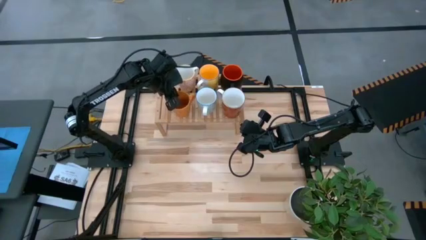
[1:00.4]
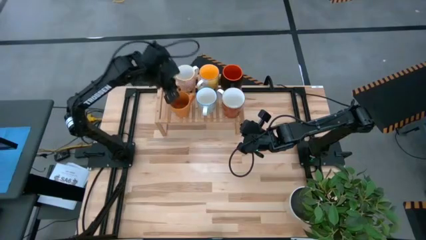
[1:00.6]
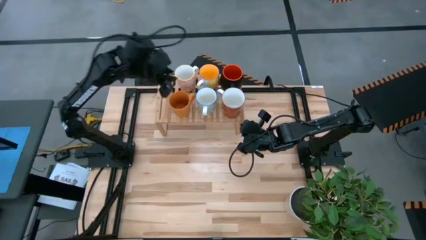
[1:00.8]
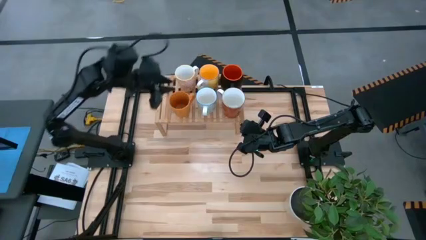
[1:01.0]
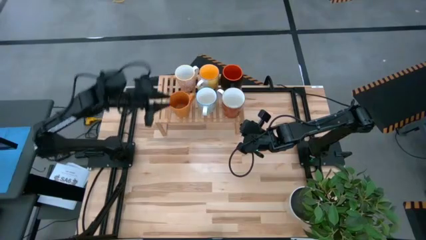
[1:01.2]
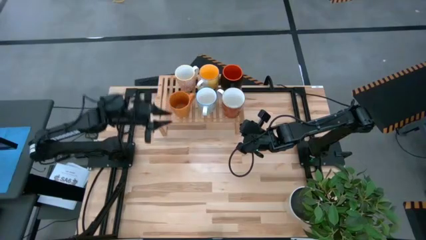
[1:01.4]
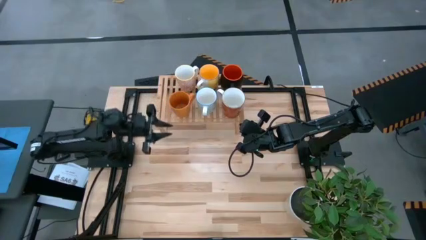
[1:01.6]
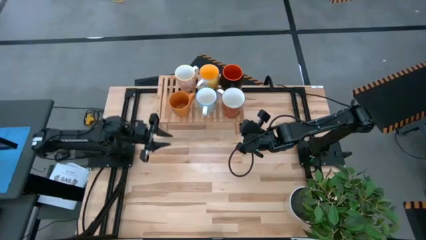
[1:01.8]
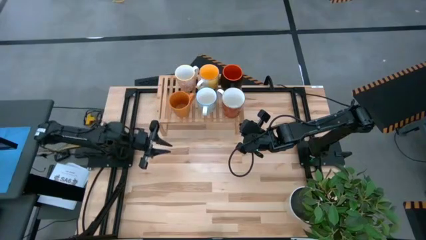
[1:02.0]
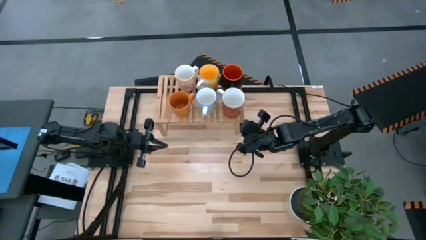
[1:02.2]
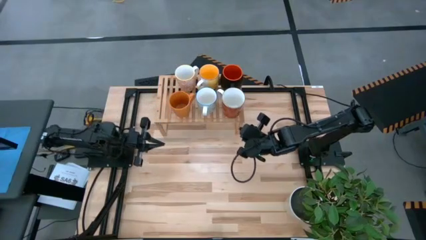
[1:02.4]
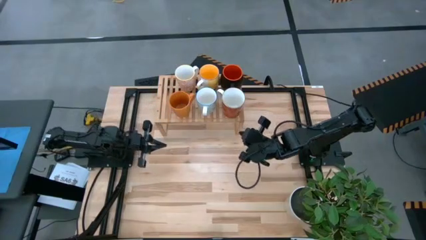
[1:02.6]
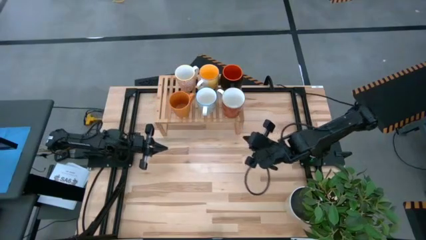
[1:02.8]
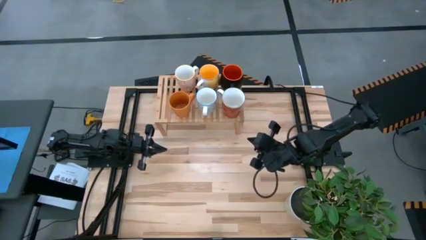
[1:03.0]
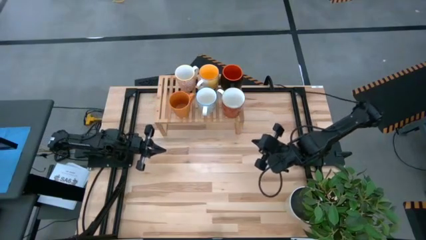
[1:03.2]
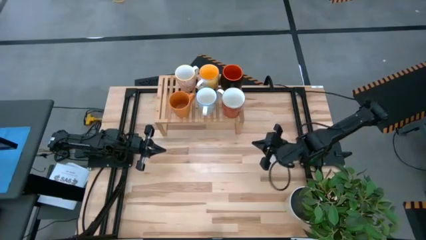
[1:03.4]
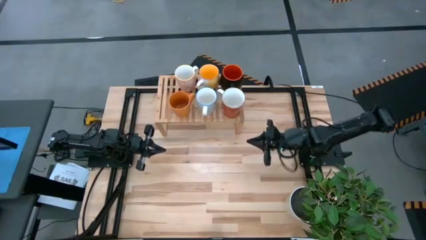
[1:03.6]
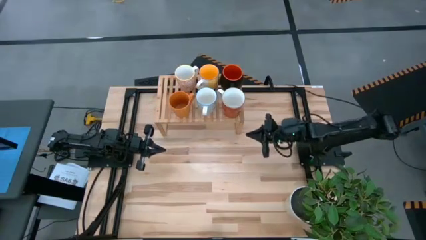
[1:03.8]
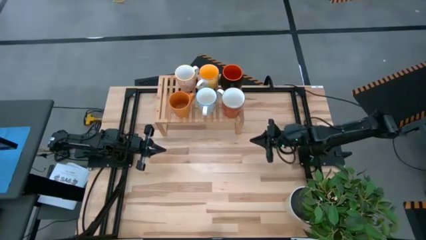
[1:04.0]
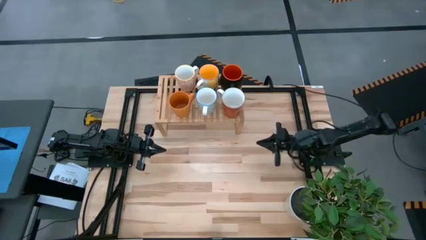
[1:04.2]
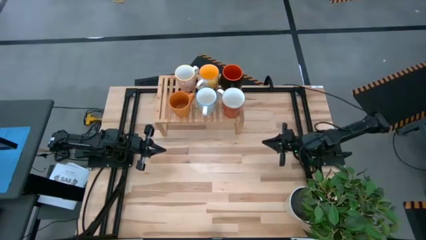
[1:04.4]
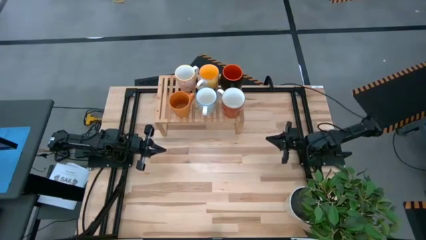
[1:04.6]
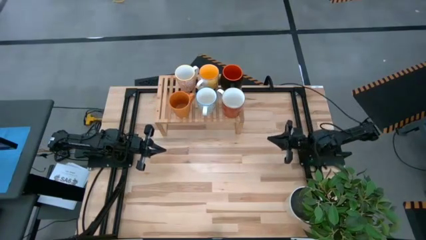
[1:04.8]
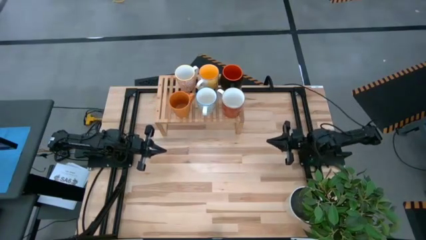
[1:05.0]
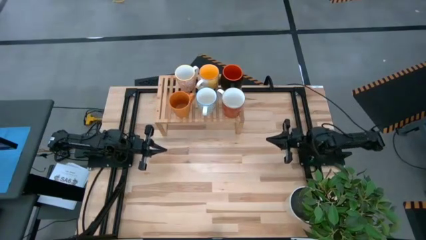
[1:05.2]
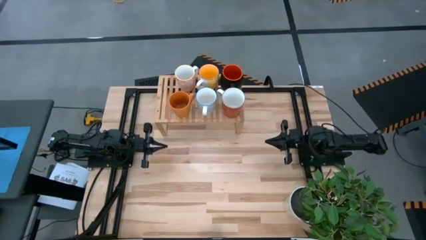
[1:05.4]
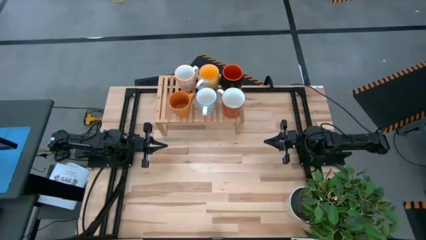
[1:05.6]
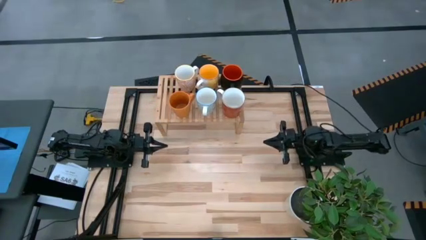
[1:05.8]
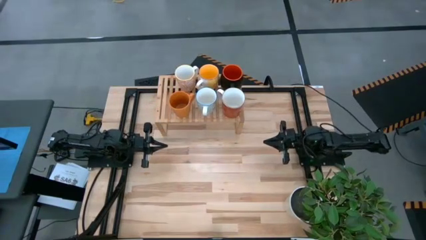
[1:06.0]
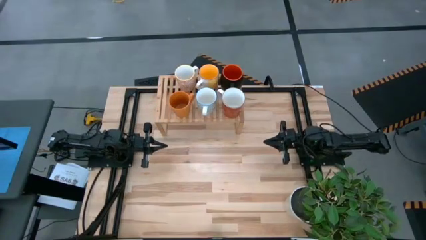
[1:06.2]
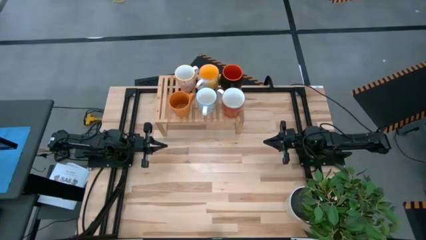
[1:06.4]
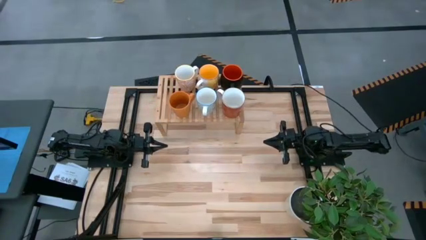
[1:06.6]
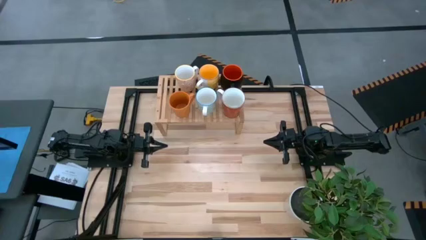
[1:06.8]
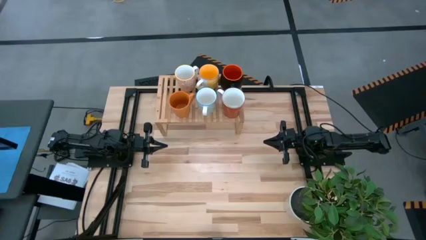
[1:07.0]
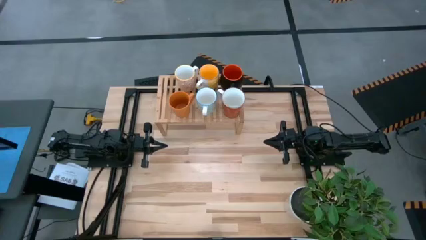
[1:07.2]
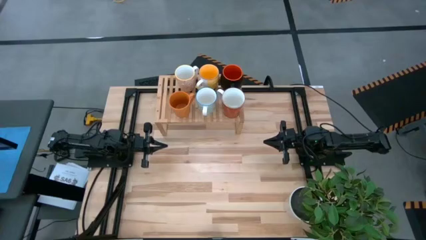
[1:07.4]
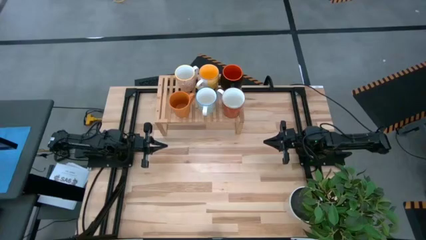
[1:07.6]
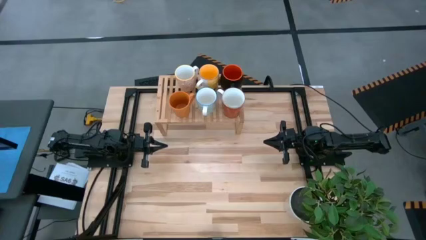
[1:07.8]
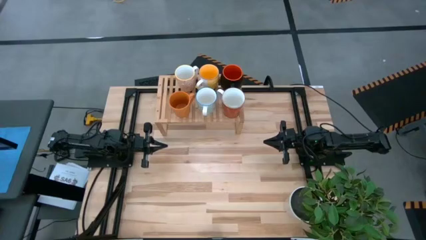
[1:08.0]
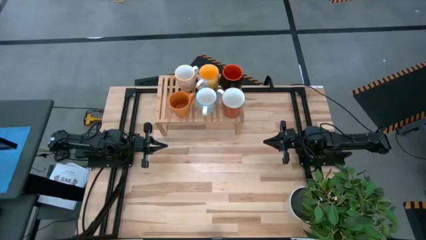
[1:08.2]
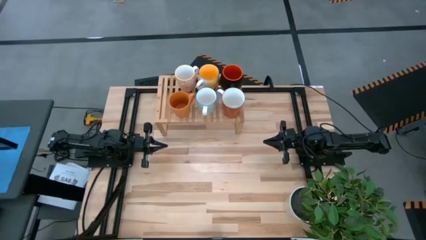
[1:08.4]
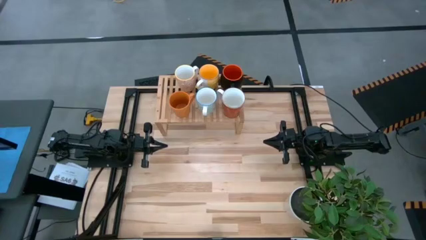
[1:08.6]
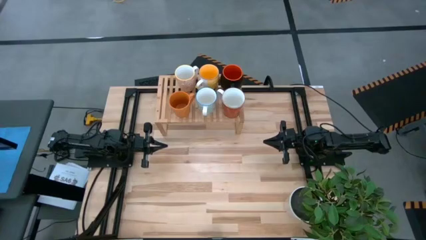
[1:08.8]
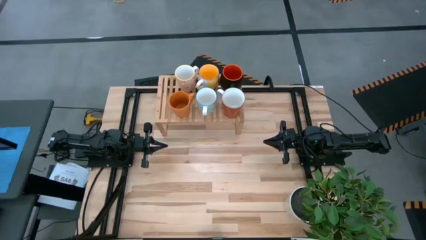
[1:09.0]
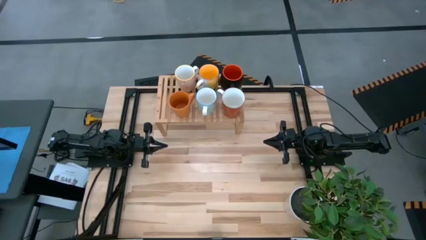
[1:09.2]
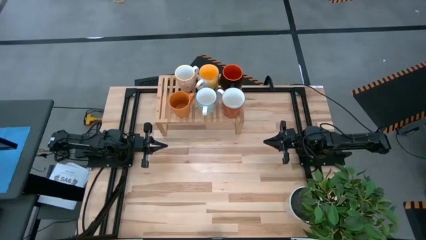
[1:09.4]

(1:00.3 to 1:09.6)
Task: Place coffee mugs
Return to Home Position

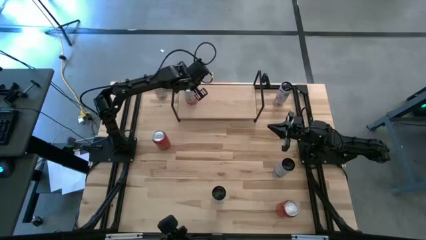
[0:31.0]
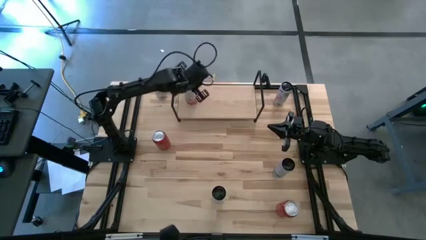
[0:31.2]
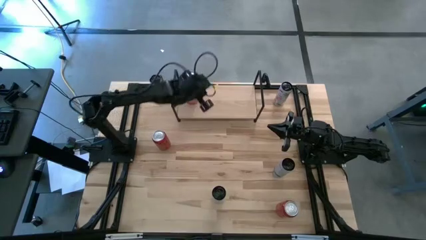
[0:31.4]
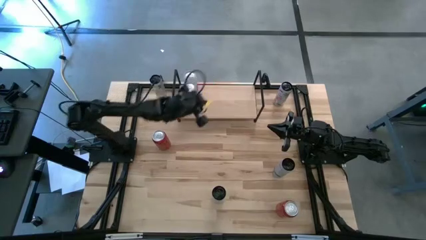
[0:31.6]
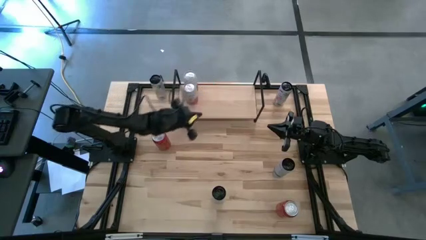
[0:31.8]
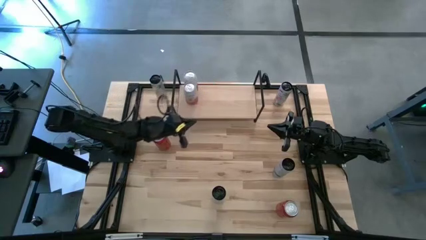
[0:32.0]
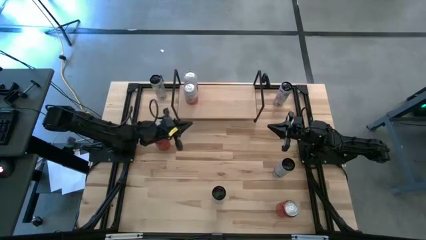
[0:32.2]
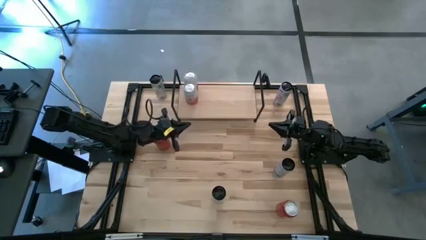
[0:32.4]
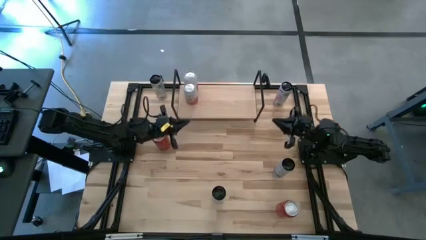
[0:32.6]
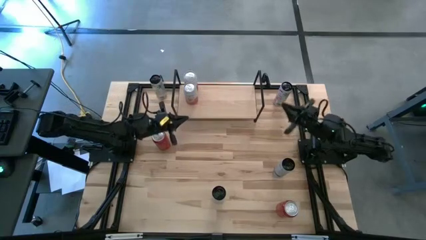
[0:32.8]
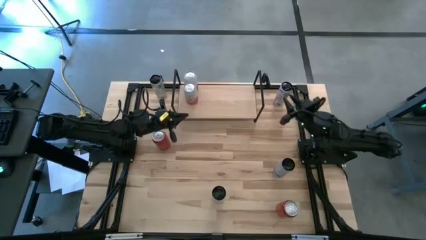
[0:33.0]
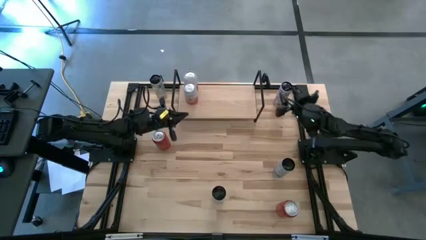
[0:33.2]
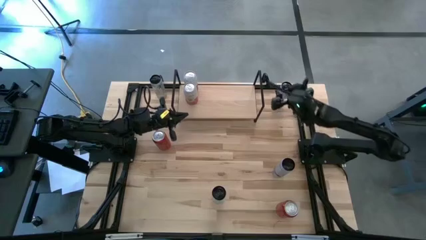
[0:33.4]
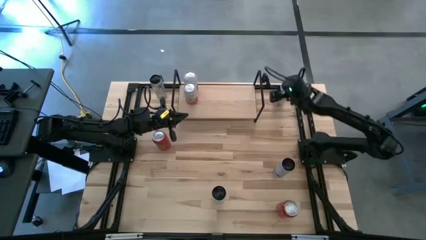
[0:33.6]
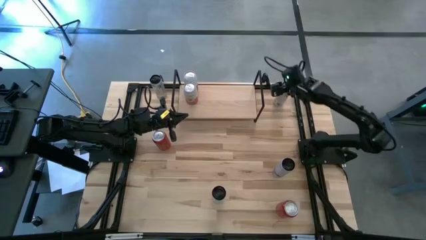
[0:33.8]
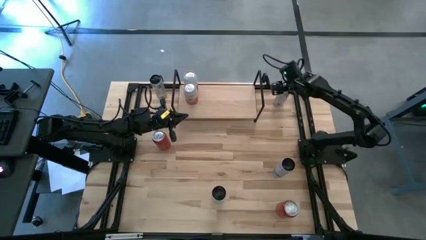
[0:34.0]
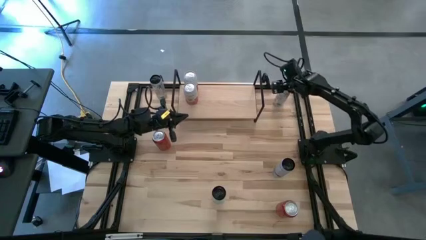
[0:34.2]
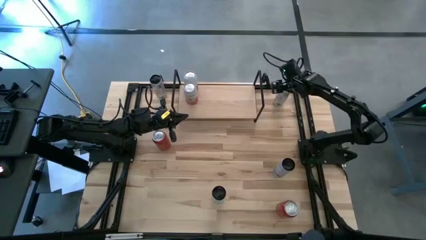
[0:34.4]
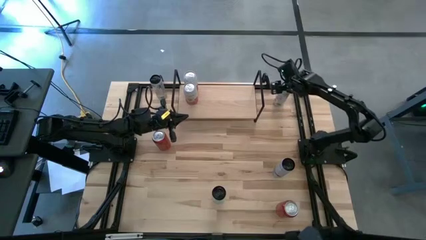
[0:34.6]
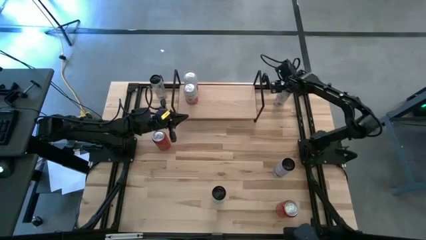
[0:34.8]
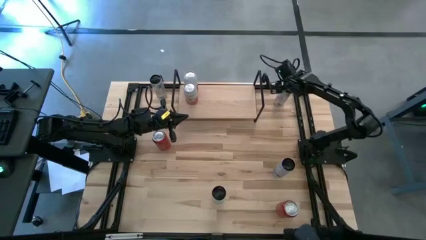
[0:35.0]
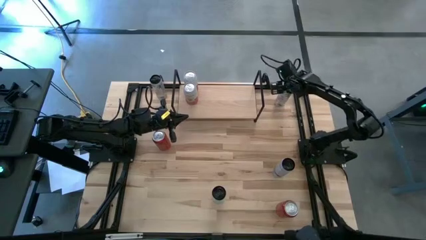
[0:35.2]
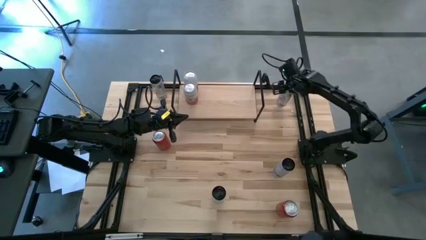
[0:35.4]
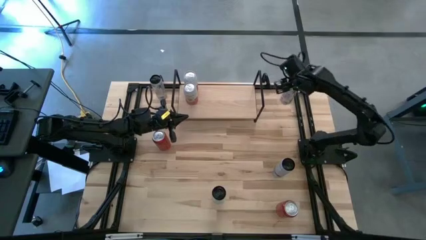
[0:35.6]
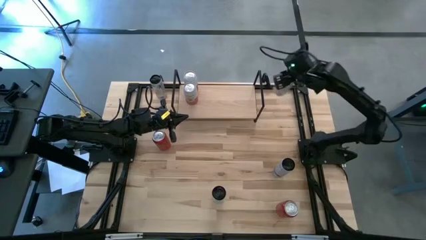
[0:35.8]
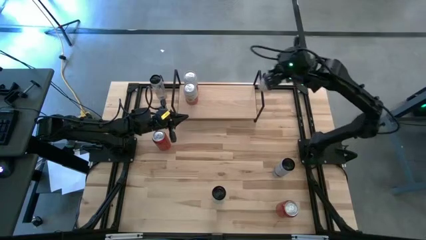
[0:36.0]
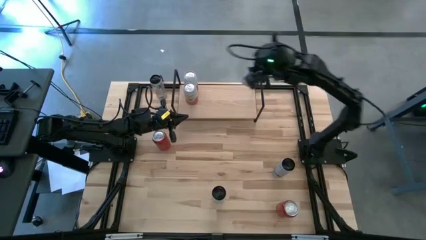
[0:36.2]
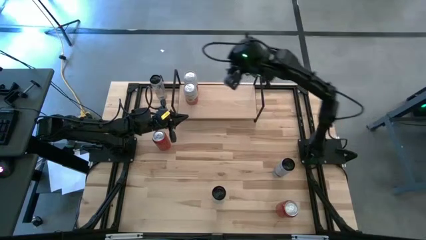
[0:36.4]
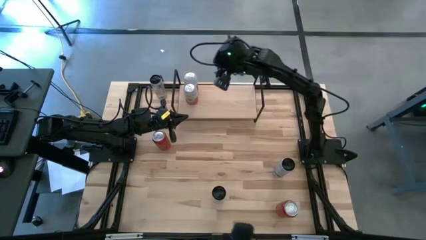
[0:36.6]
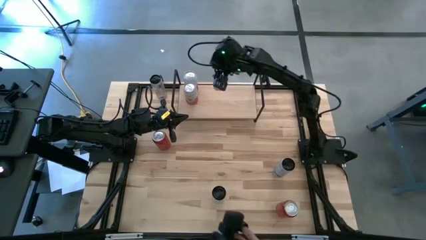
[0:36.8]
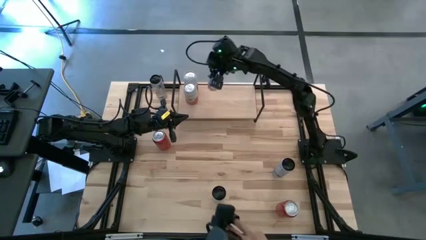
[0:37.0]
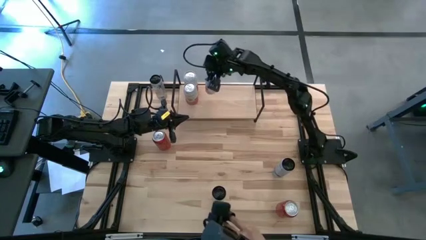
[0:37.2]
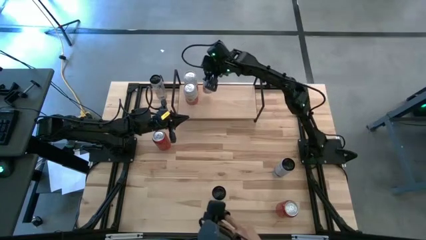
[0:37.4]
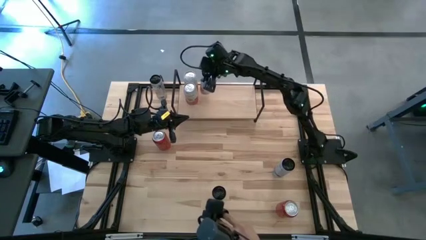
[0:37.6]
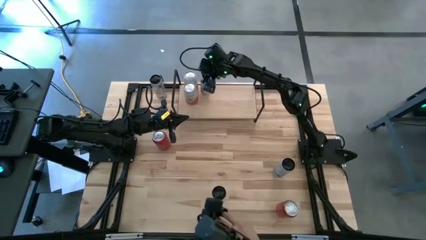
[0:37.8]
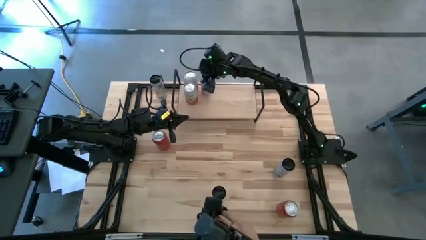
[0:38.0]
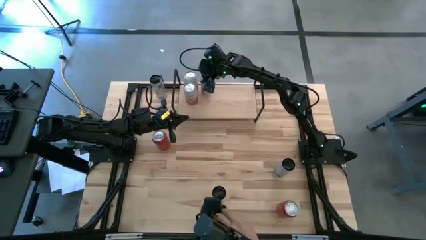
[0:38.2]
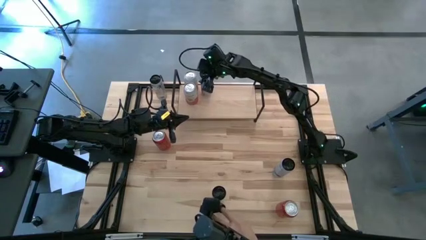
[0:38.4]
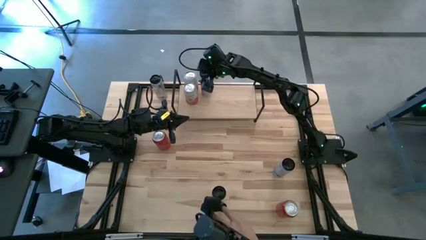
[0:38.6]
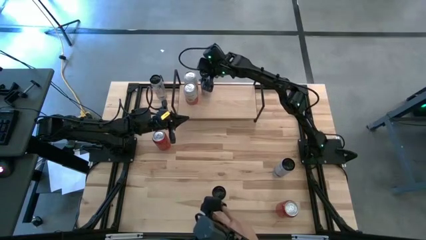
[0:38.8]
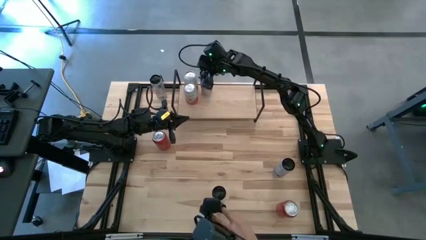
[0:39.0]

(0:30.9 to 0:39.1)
Task: Place canned beverage on shelf
Put the right white pink soda can on the shelf
